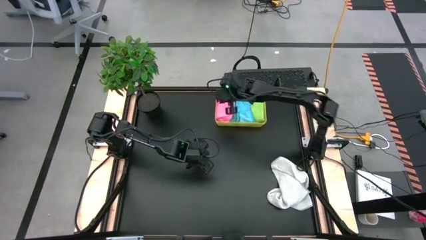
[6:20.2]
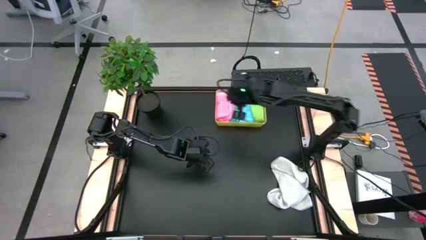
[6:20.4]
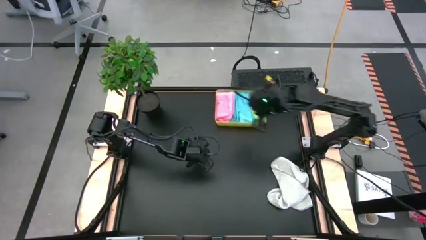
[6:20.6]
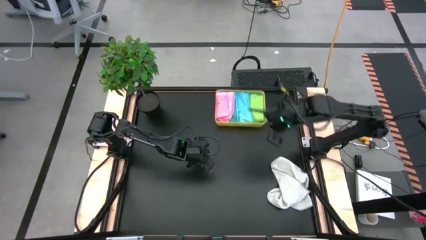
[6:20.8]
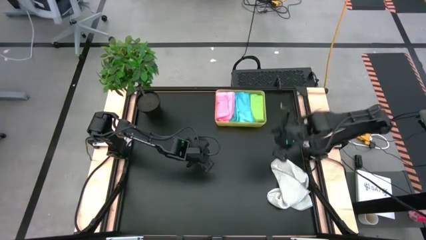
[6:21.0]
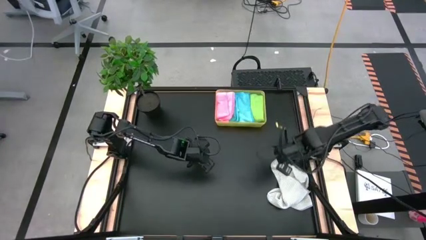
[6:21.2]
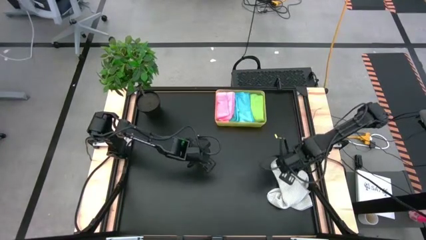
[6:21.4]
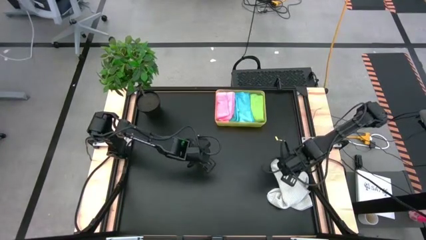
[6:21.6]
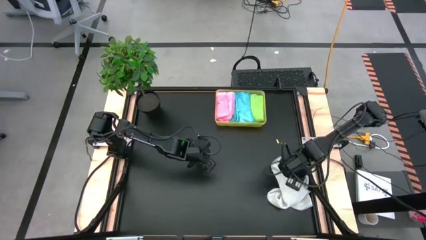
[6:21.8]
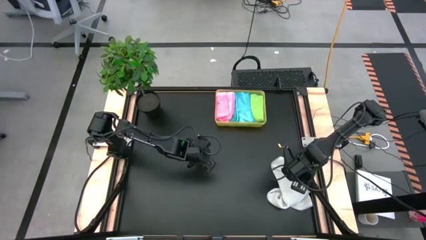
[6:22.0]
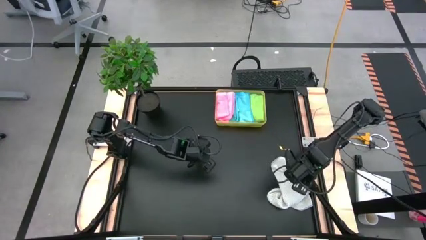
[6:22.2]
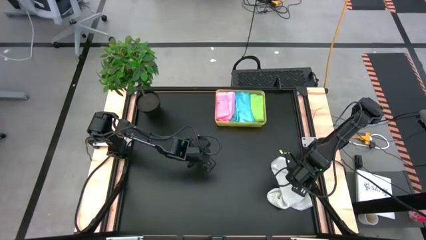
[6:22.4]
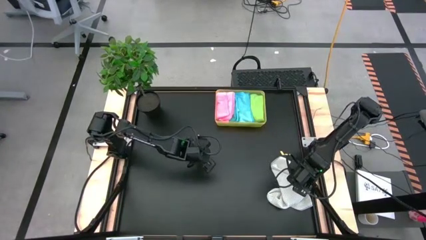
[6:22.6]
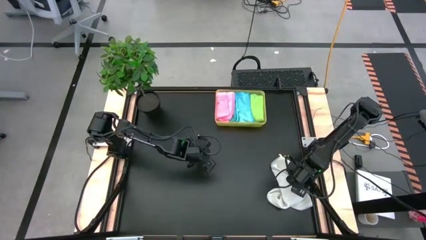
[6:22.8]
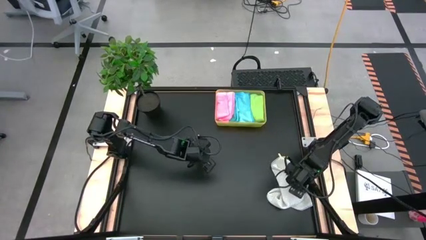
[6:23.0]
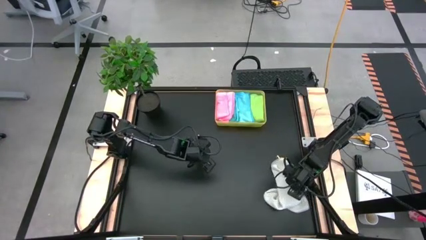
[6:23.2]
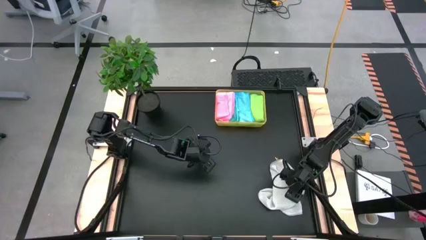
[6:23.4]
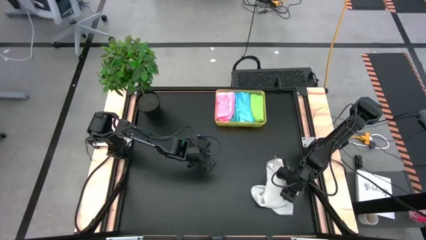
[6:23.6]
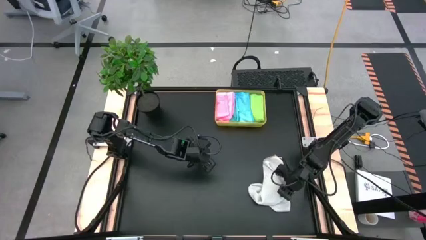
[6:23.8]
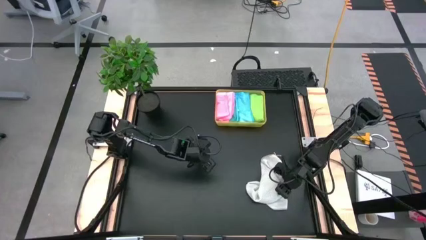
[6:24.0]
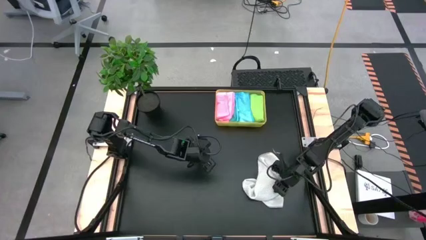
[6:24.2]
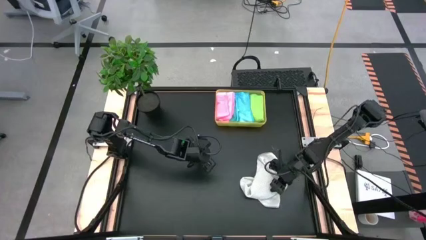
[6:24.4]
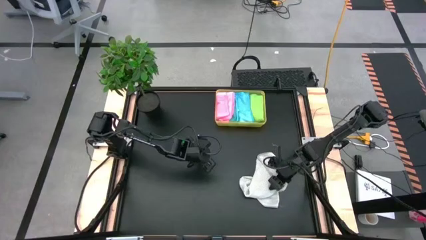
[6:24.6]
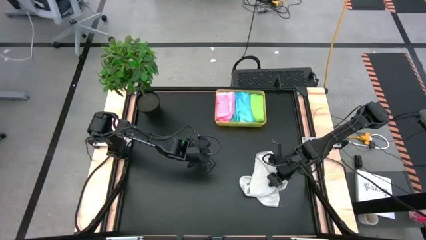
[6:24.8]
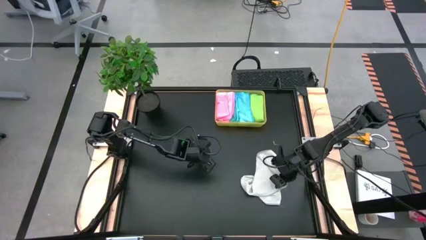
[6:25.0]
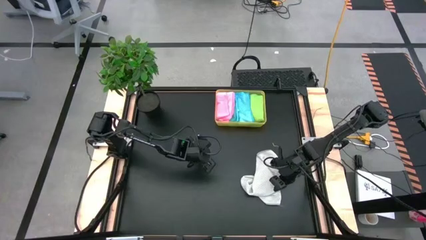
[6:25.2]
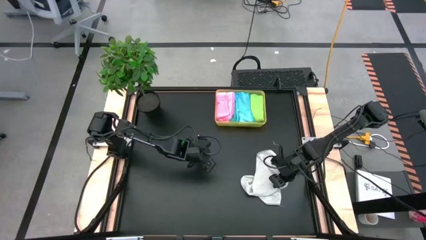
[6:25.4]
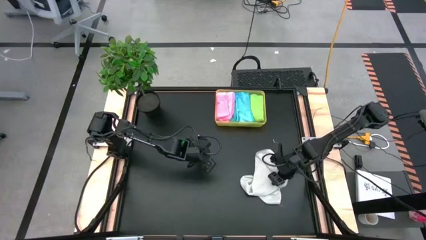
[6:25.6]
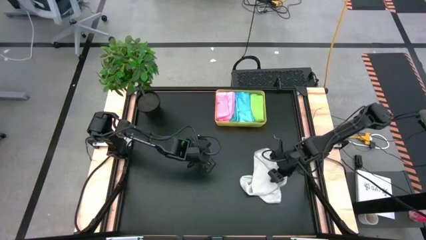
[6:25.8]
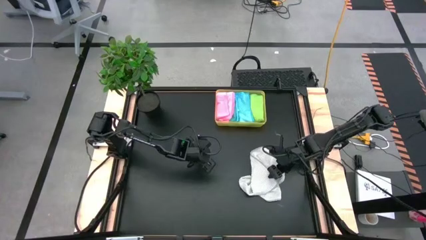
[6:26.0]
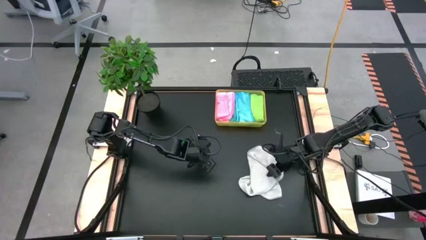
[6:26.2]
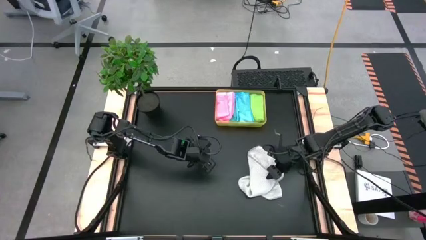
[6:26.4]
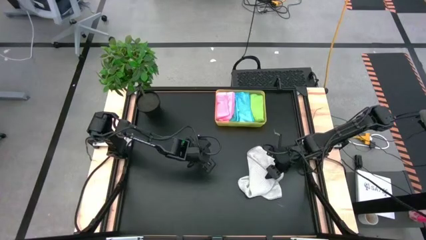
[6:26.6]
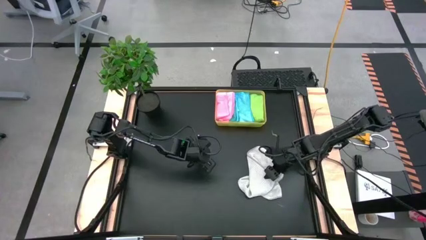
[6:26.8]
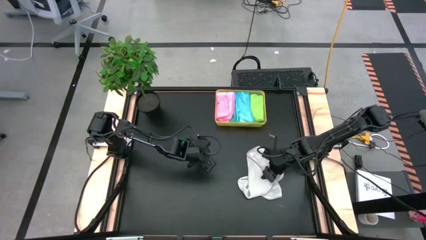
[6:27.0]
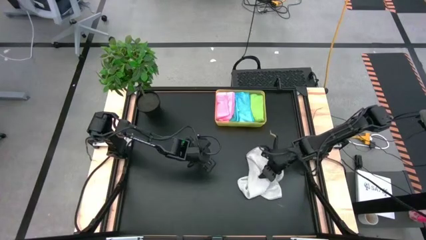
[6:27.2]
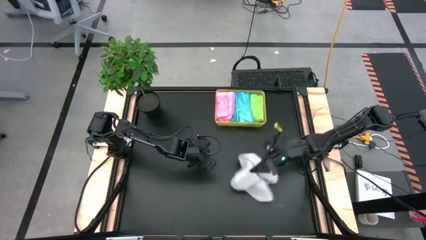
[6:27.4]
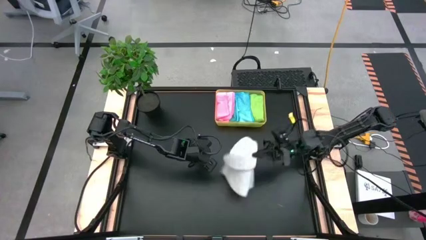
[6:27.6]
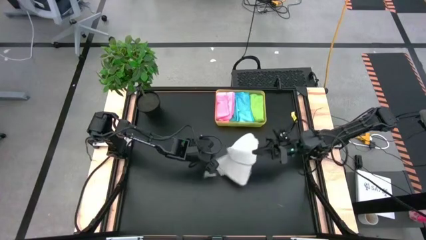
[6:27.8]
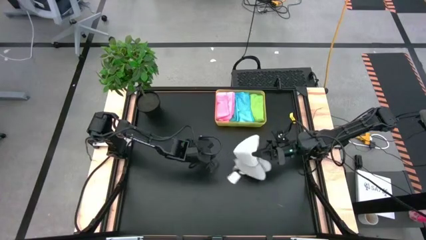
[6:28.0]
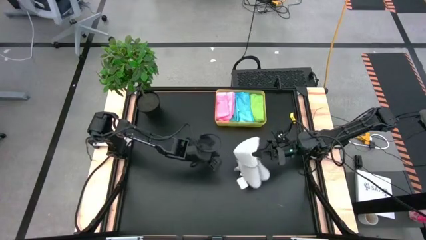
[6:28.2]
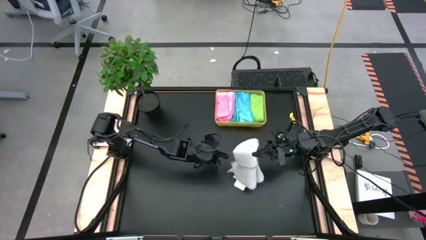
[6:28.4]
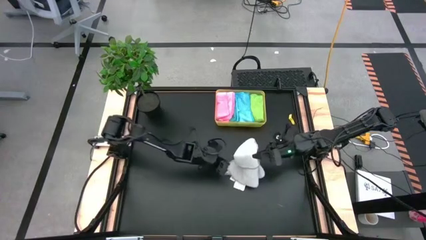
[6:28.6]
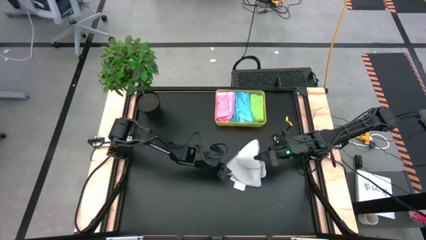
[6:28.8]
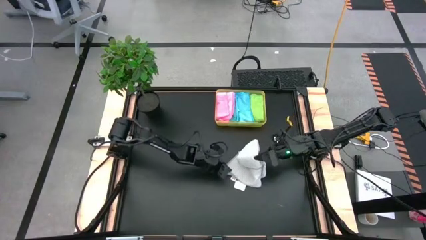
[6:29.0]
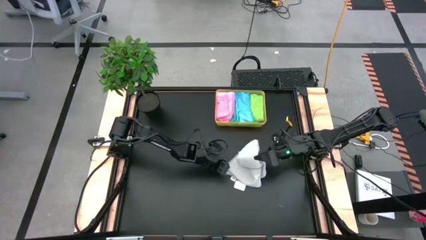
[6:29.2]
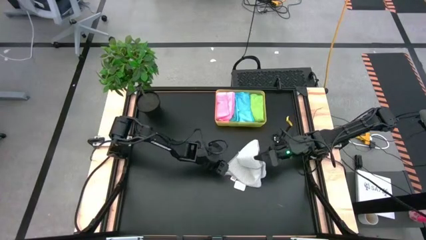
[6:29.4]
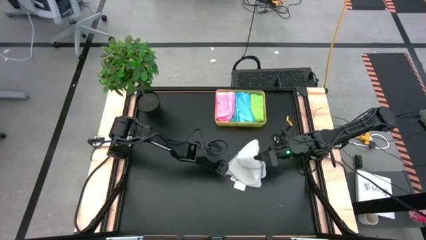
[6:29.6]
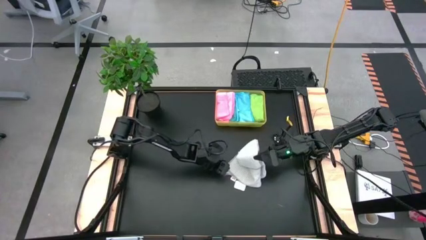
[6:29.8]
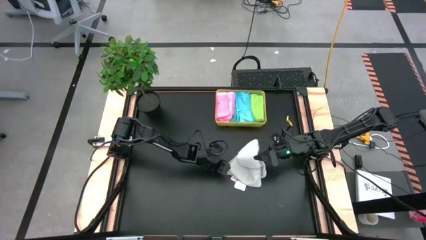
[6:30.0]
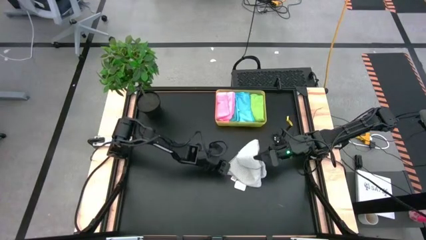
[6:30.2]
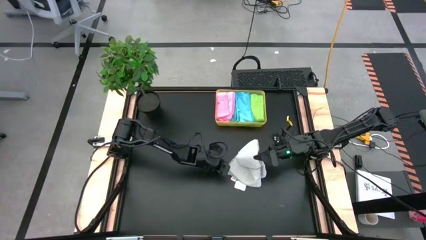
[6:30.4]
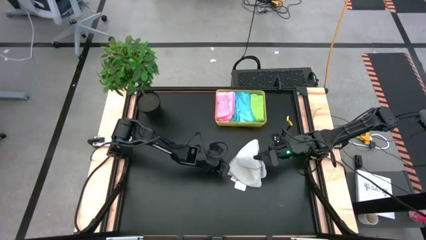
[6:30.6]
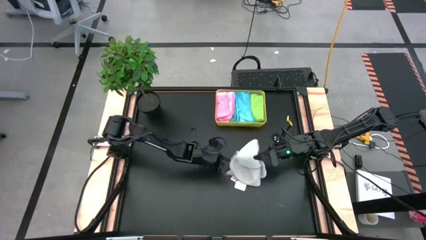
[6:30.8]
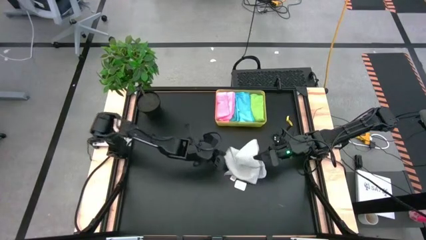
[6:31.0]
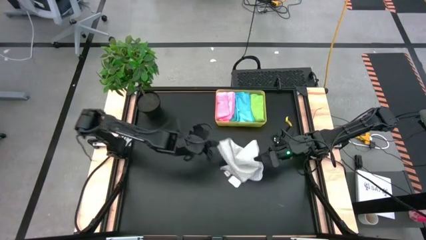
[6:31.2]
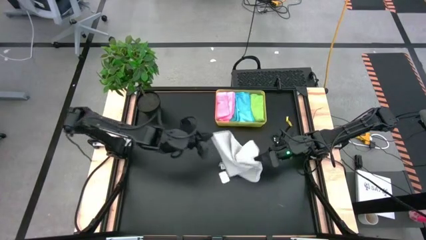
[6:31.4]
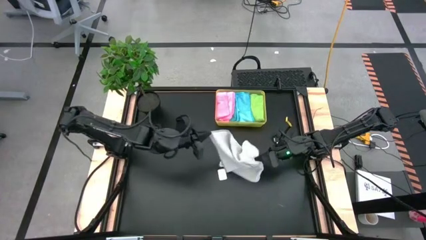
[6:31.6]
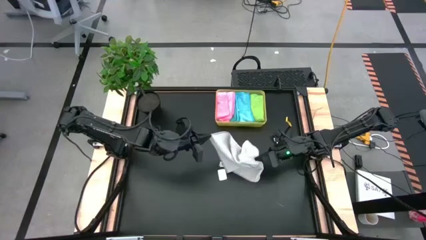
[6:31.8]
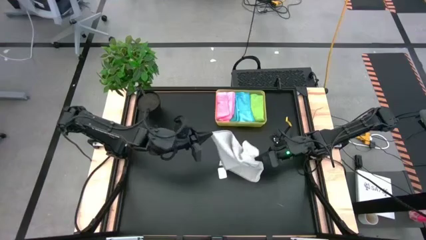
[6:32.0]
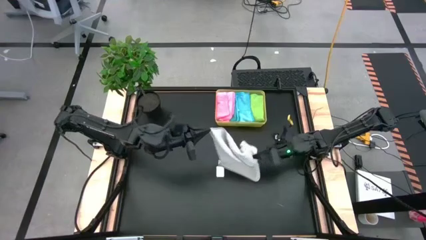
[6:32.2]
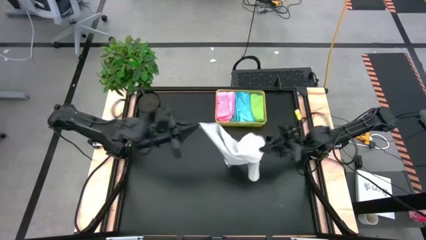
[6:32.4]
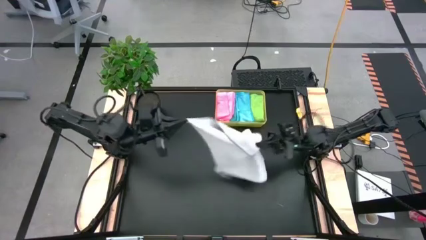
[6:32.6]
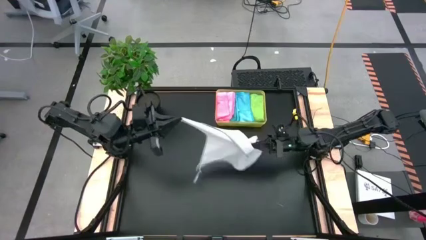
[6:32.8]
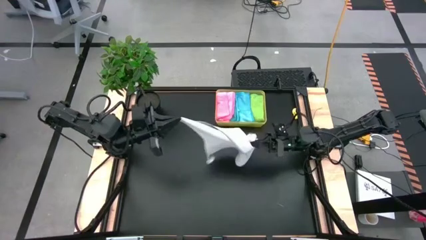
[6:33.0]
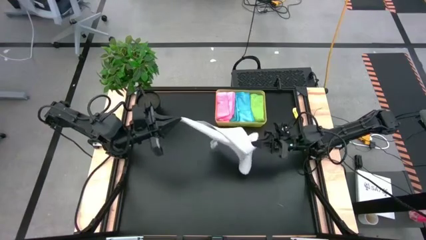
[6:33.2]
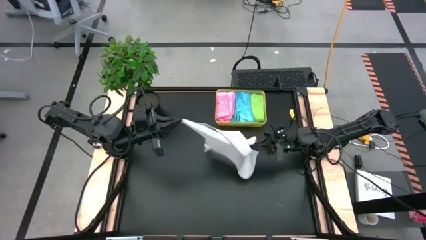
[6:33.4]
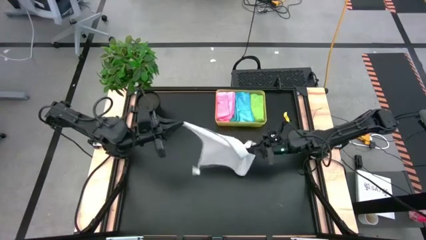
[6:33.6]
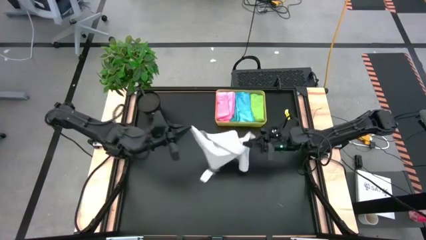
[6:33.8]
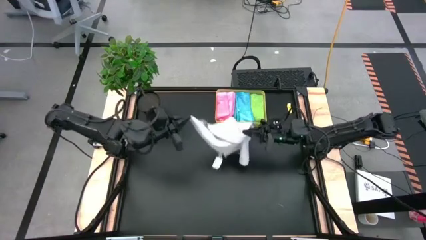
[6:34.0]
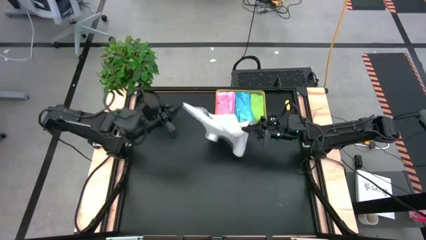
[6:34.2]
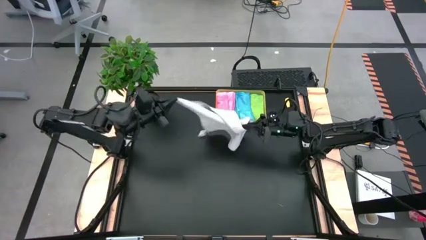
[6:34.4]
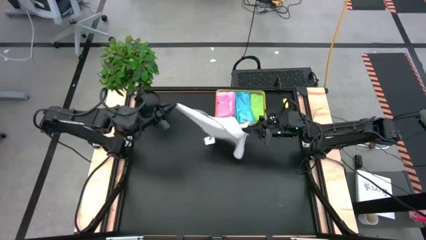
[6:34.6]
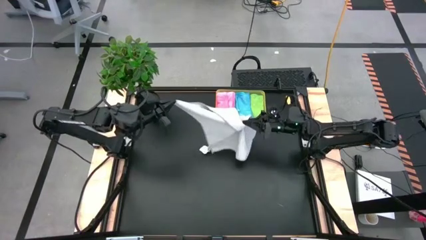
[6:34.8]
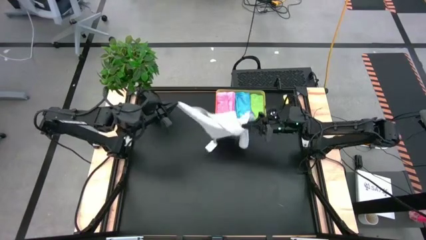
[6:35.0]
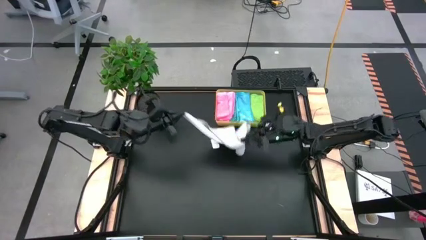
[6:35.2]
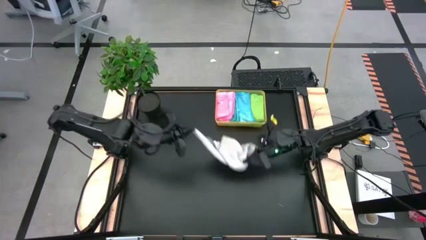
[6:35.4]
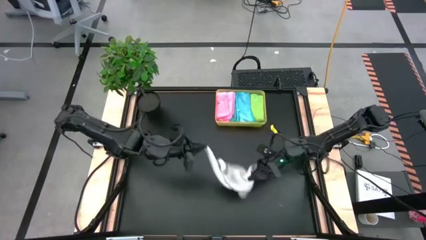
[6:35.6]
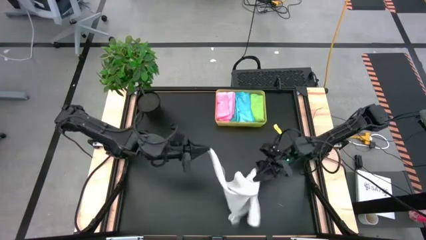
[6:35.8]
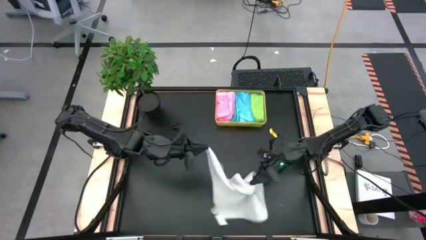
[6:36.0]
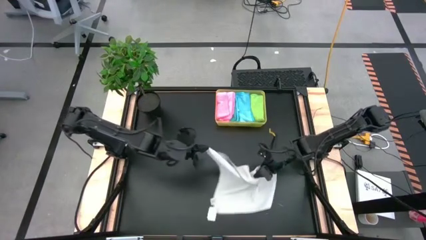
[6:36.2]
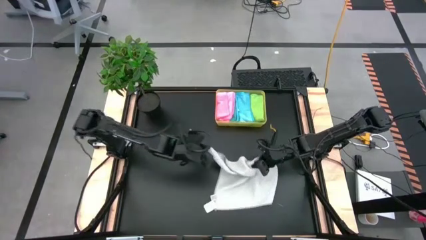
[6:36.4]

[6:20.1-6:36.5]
Task: Fold microfiber towels
Fold the white microfiber cloth
